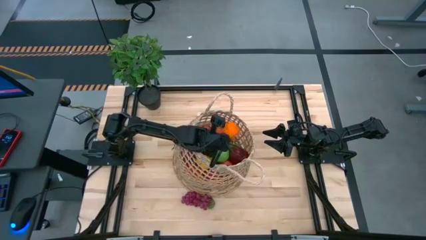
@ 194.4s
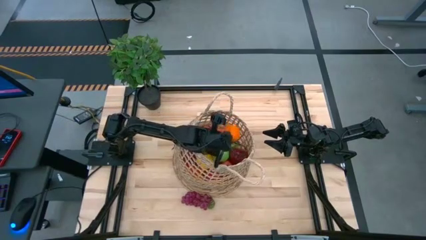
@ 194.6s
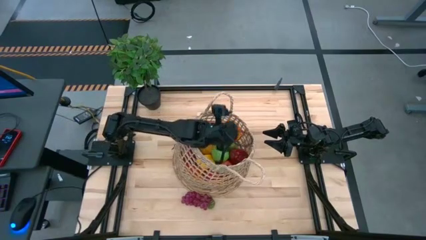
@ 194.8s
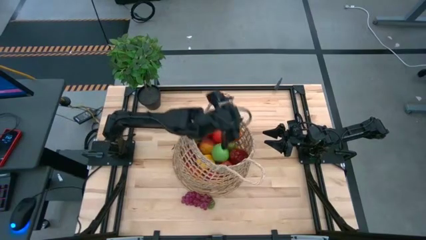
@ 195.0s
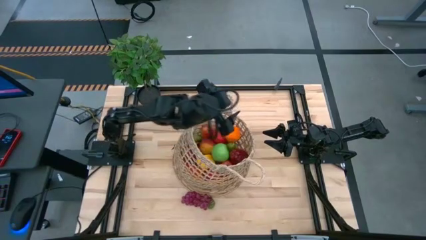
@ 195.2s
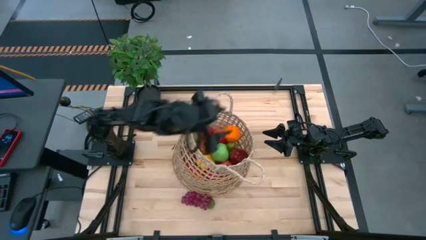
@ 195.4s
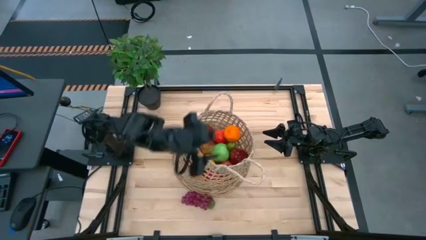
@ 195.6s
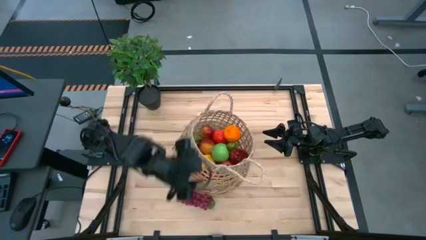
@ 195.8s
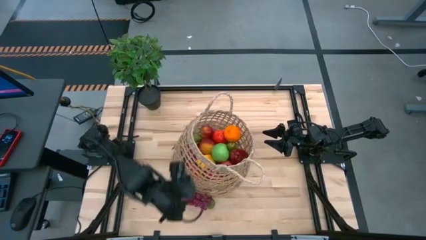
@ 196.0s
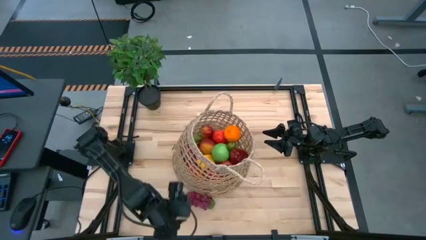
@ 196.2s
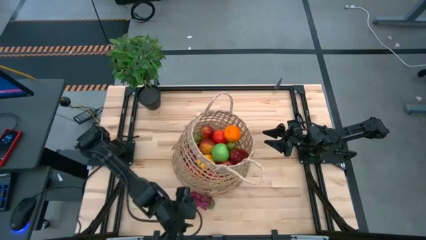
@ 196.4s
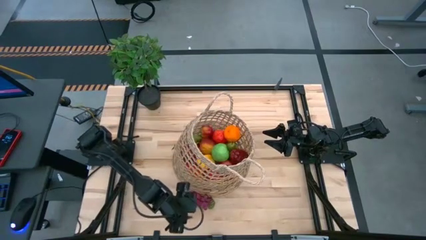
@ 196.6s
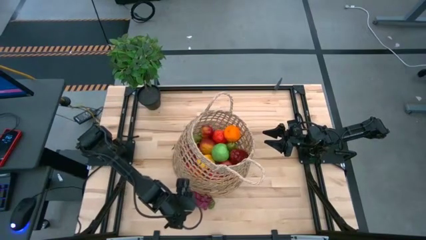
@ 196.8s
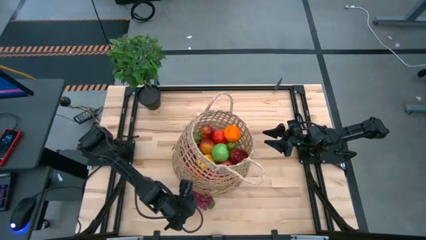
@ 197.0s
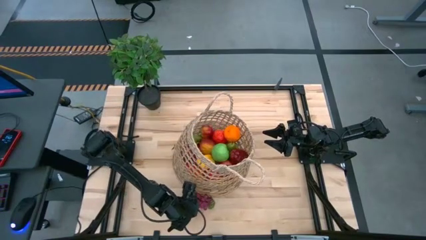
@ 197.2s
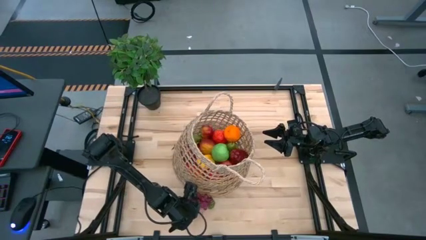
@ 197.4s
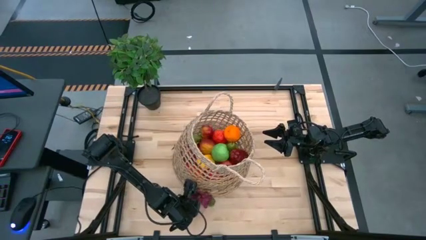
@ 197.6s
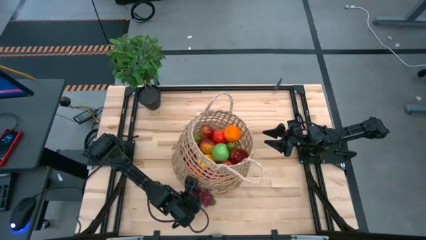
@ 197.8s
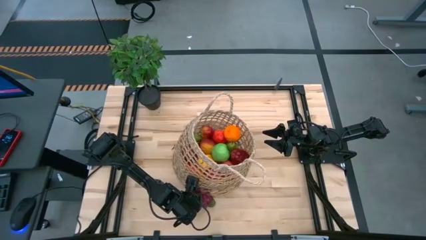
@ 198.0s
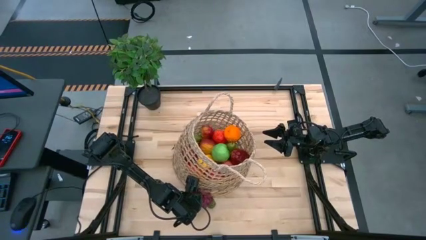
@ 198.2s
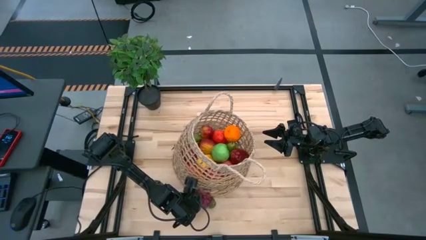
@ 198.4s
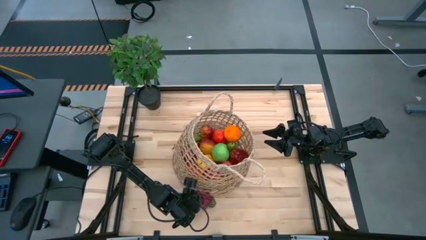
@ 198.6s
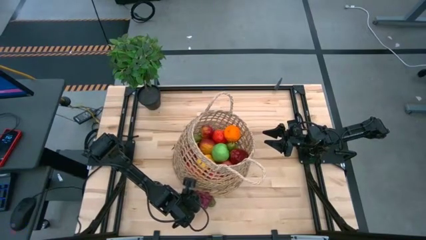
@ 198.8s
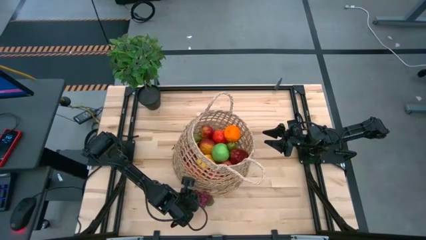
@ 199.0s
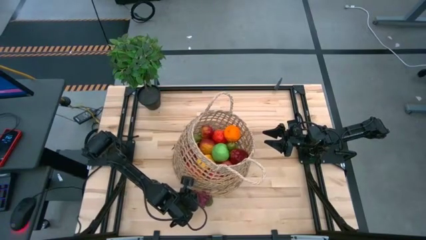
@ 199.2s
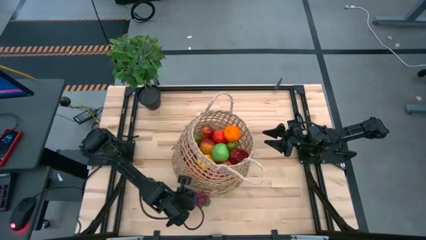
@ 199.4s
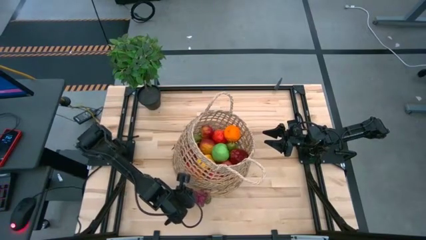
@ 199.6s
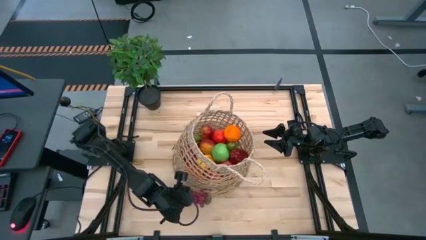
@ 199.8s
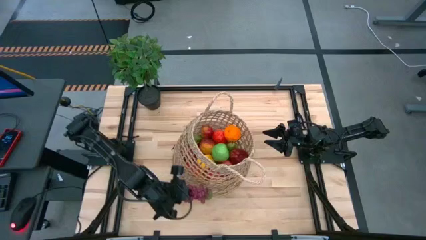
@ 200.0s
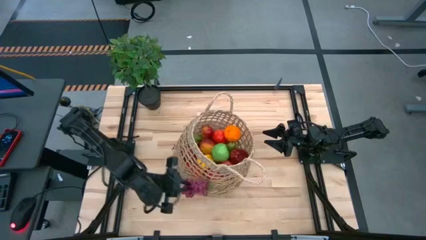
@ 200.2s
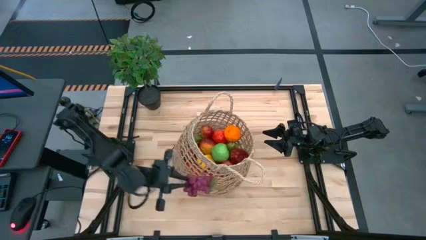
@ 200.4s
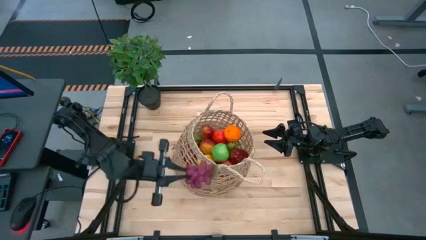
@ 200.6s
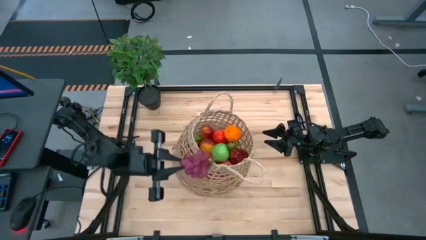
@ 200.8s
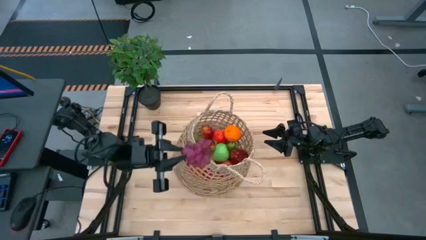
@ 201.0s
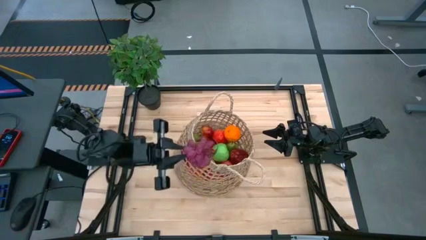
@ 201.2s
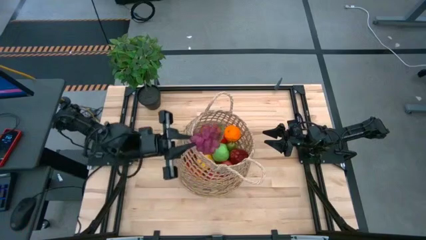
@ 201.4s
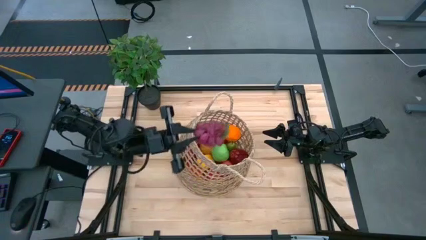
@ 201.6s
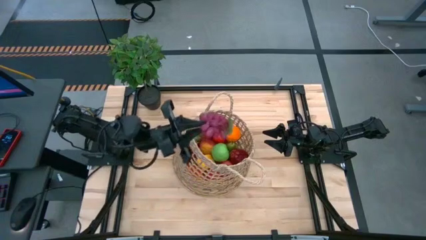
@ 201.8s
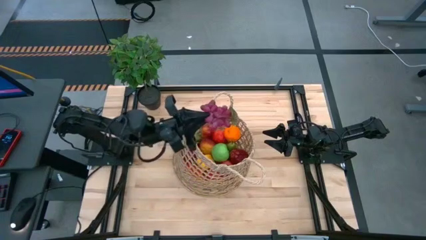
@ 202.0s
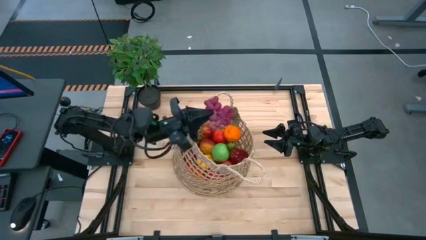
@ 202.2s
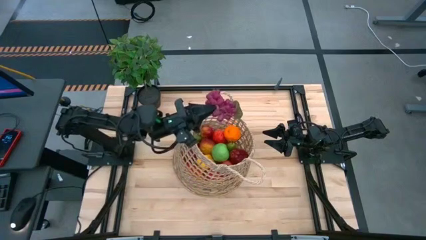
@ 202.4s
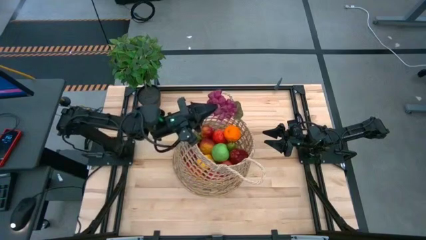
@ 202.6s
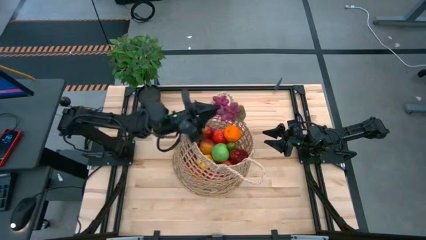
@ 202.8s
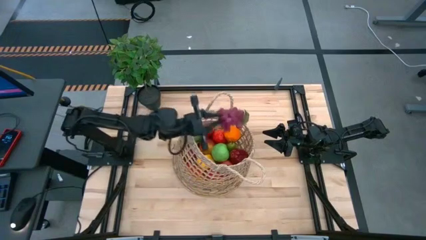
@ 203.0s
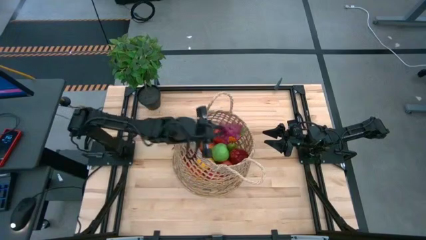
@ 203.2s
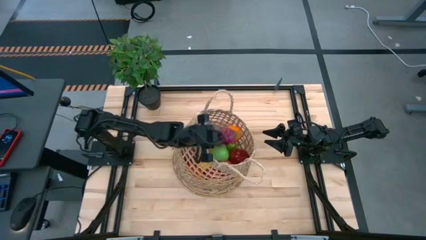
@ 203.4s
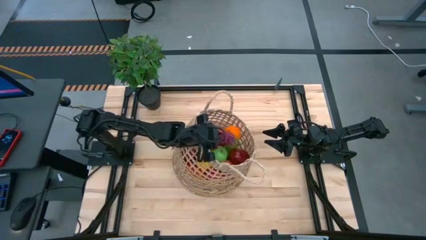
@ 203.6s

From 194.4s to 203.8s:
Task: Build produce basket
Put the grapes into the basket

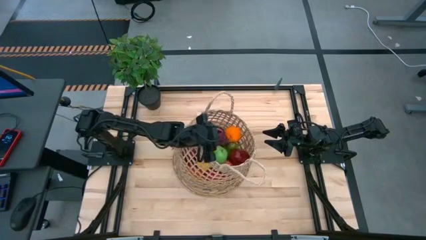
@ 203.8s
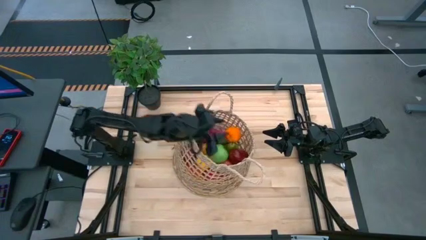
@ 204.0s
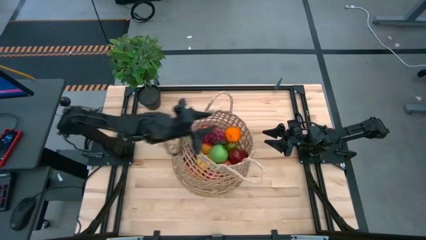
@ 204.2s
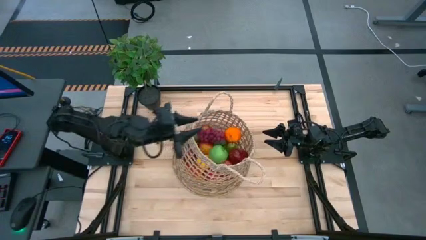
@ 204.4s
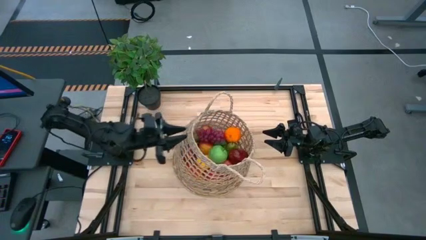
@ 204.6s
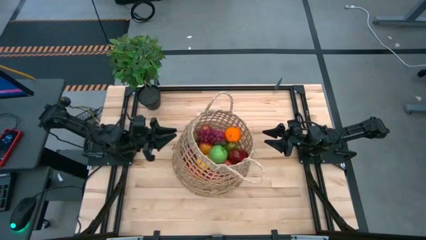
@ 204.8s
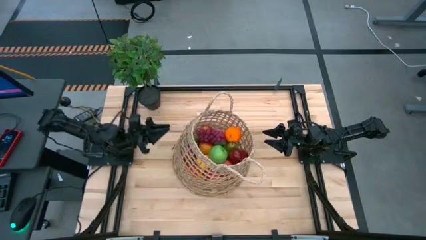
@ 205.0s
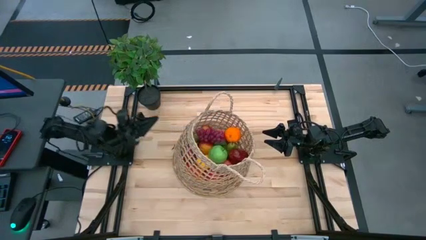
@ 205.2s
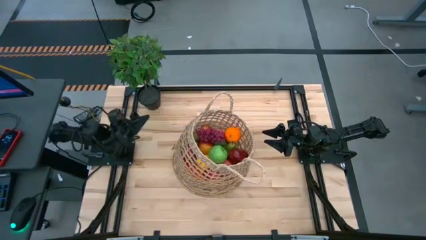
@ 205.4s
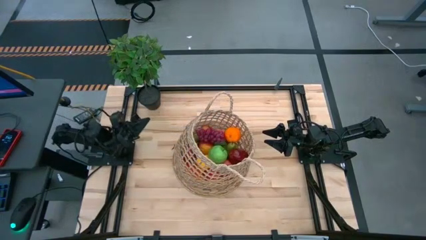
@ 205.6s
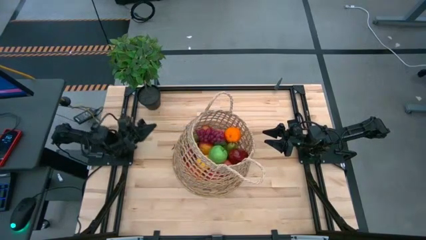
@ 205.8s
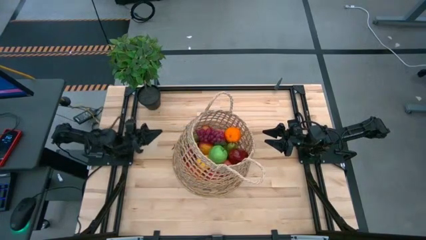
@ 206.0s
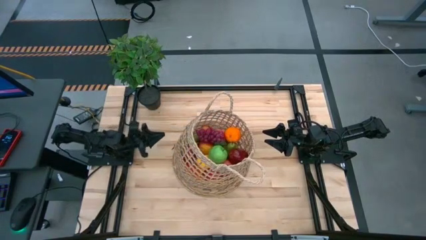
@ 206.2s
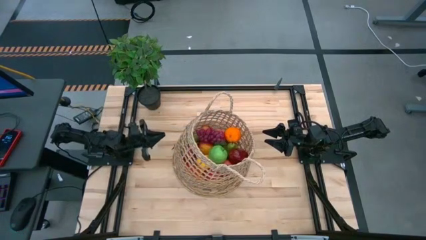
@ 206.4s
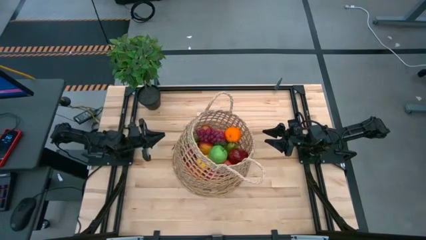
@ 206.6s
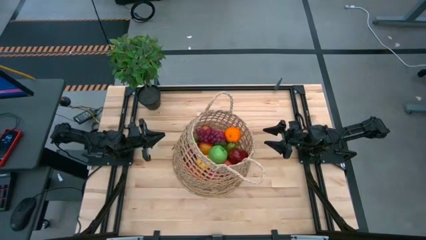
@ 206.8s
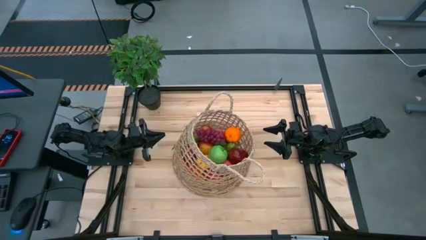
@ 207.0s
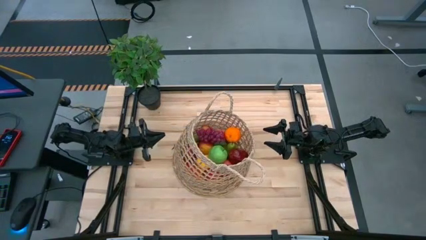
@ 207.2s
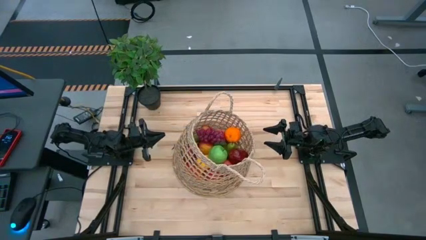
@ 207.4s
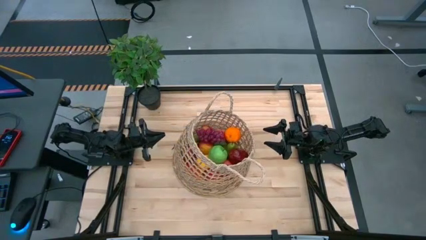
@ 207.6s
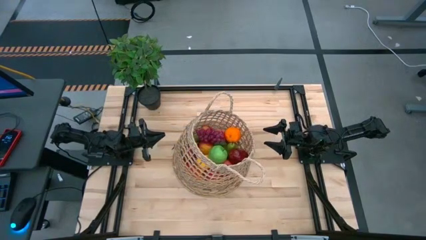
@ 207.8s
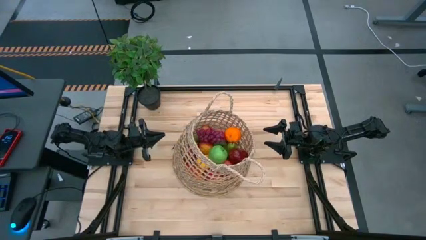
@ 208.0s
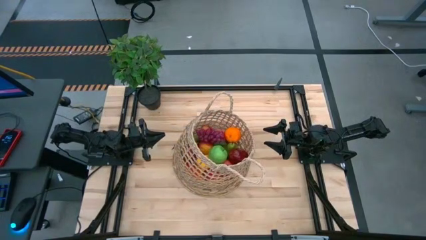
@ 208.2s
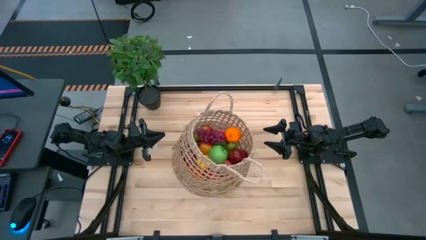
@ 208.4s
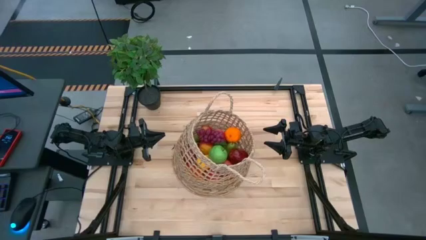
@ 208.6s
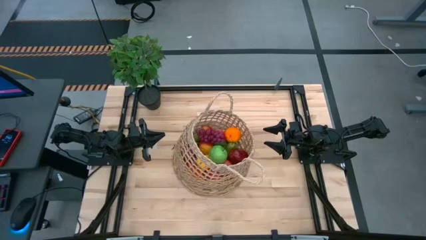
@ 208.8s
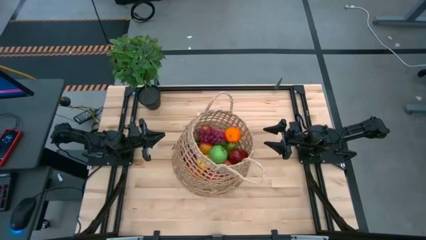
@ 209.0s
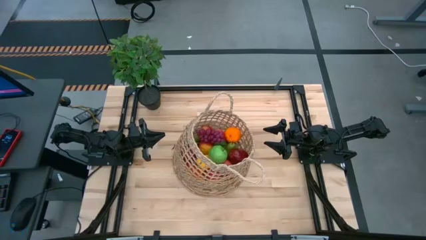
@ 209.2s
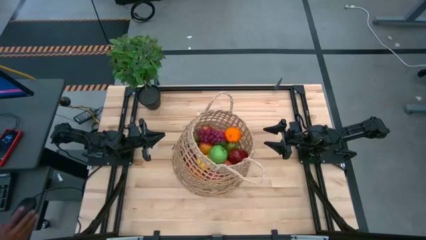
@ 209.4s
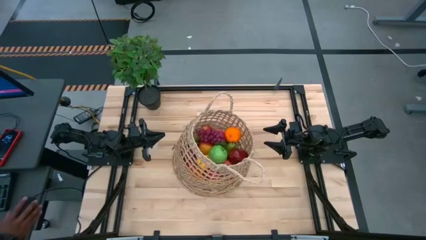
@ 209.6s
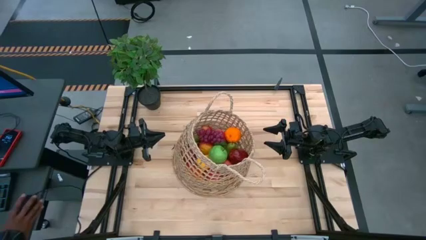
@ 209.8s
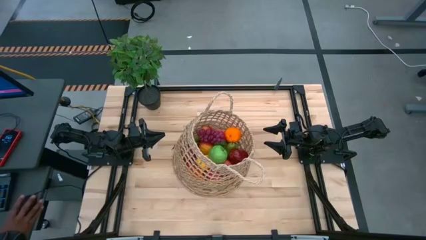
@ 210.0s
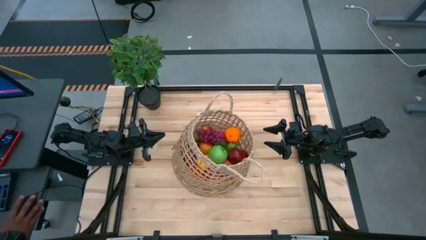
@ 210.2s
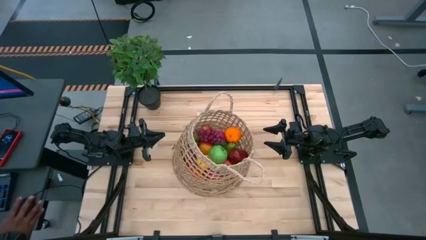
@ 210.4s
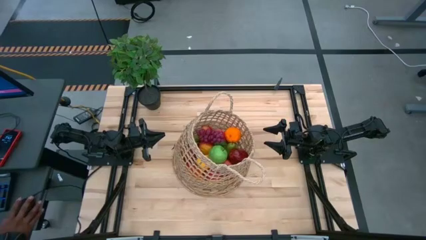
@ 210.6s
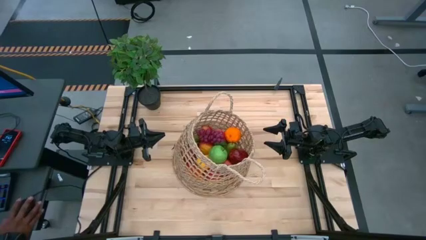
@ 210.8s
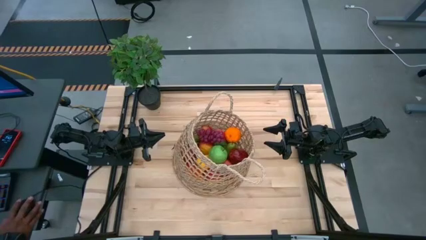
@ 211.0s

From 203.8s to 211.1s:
Return to Home Position
